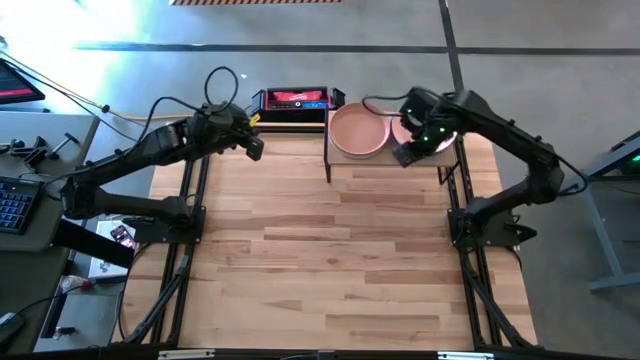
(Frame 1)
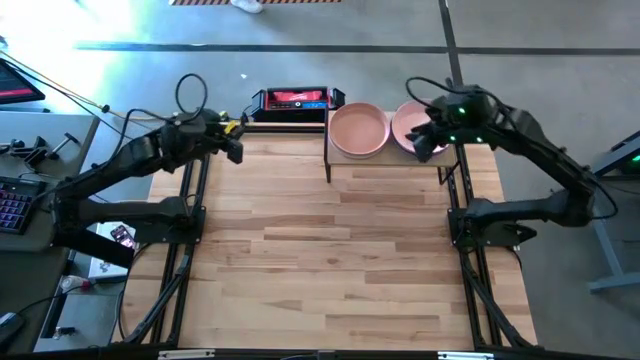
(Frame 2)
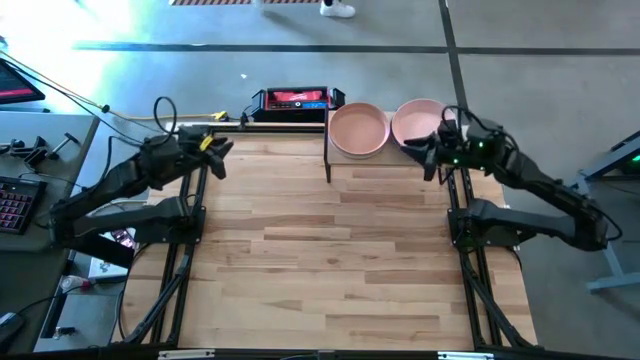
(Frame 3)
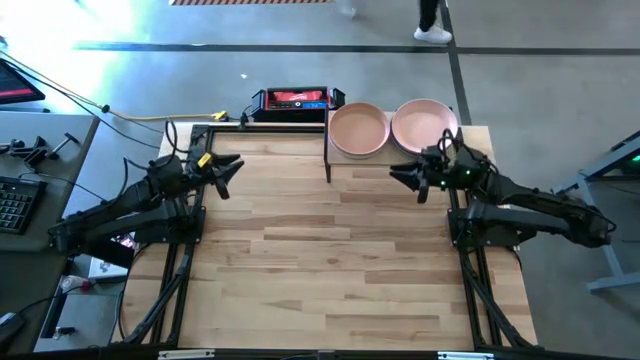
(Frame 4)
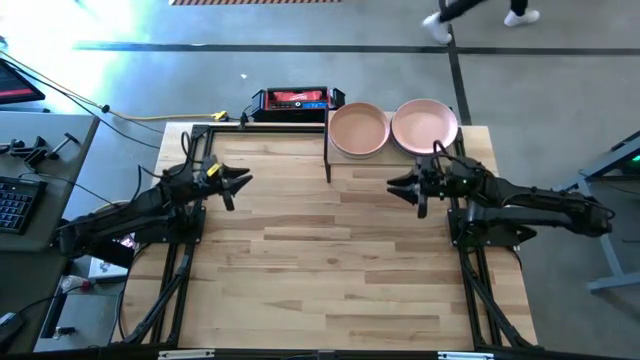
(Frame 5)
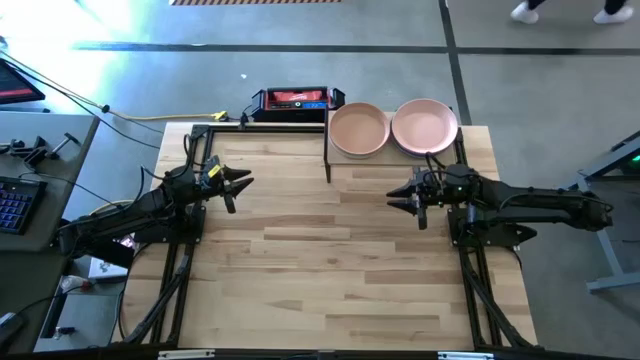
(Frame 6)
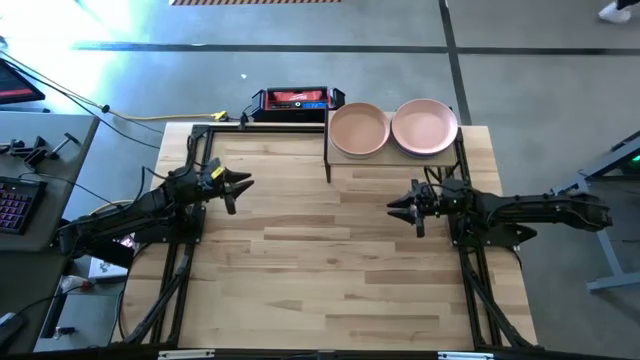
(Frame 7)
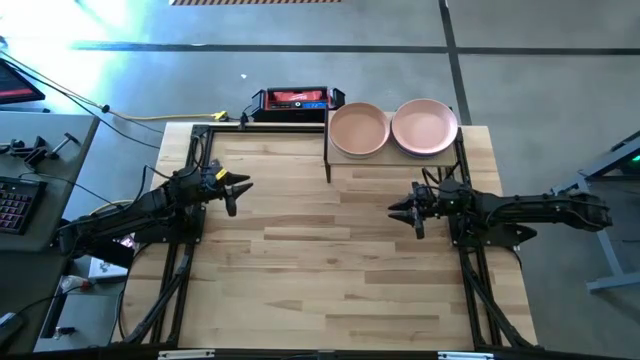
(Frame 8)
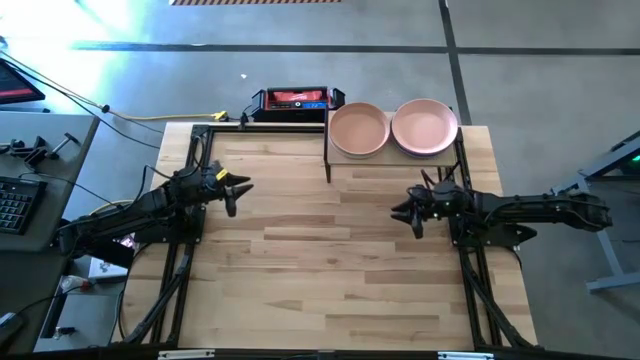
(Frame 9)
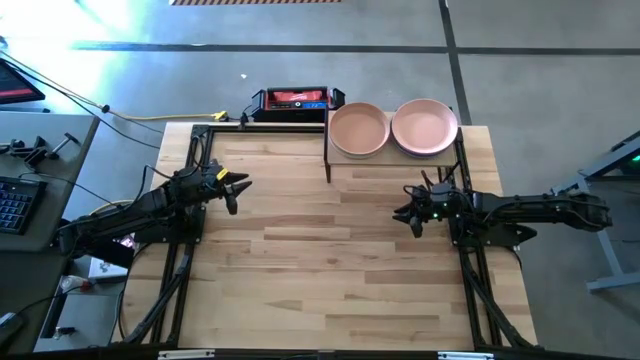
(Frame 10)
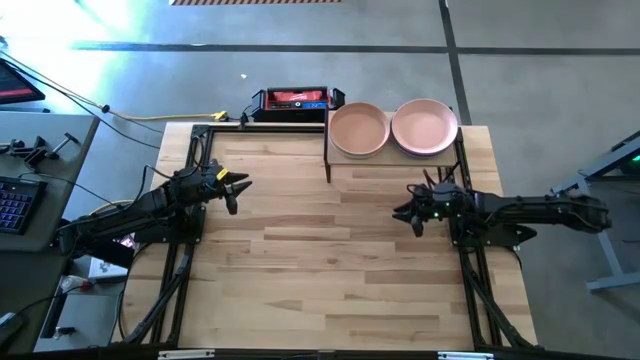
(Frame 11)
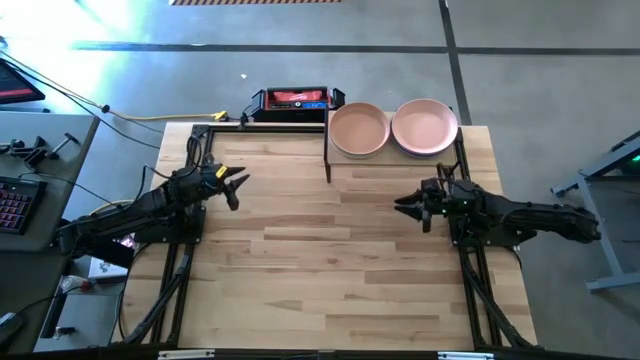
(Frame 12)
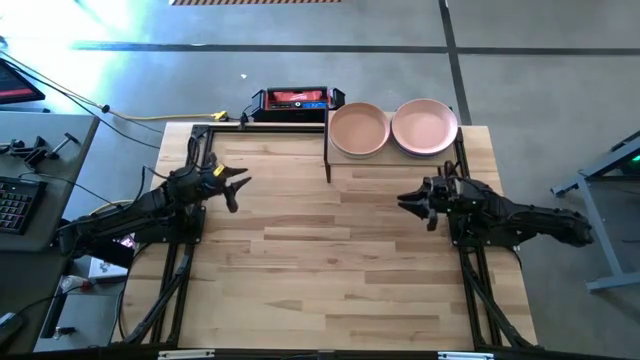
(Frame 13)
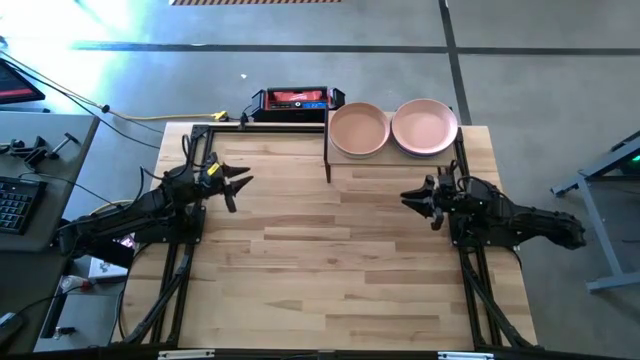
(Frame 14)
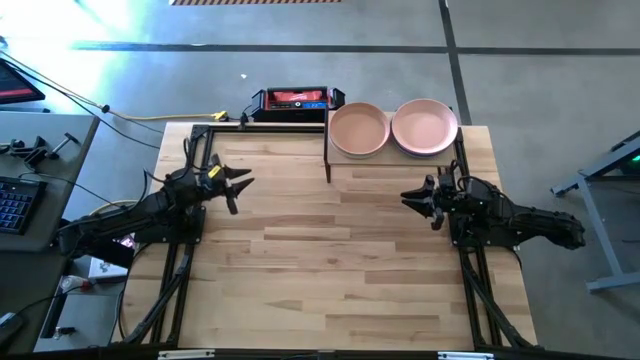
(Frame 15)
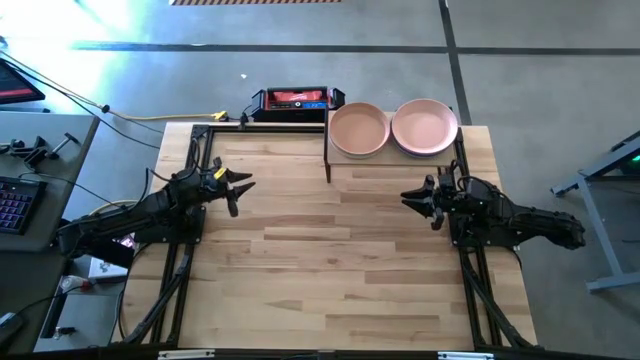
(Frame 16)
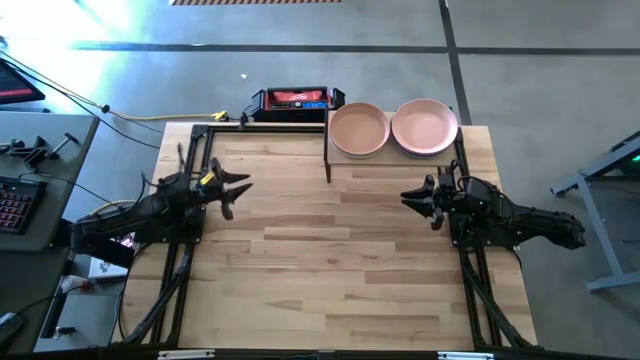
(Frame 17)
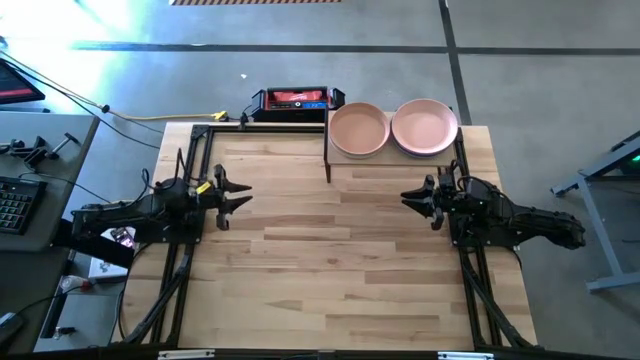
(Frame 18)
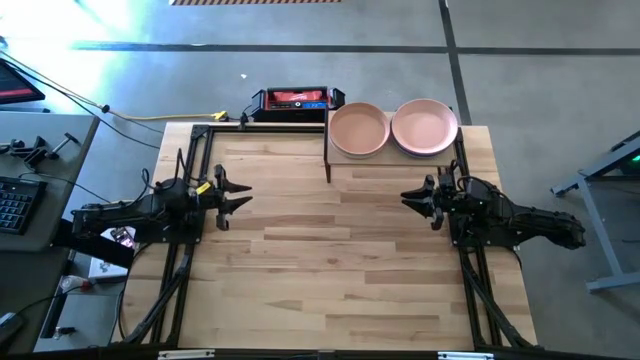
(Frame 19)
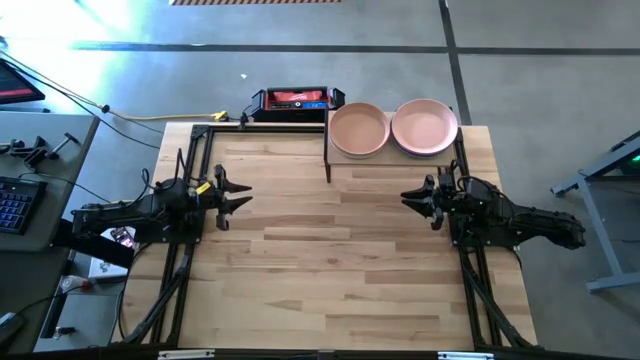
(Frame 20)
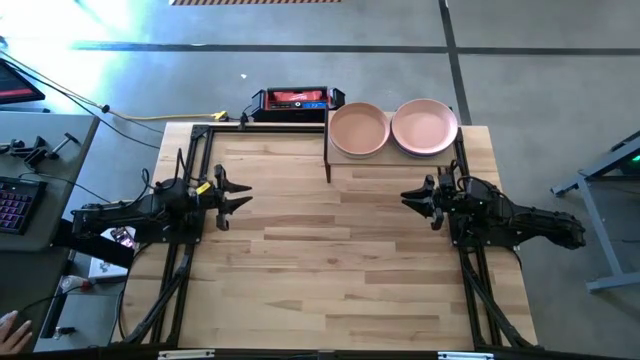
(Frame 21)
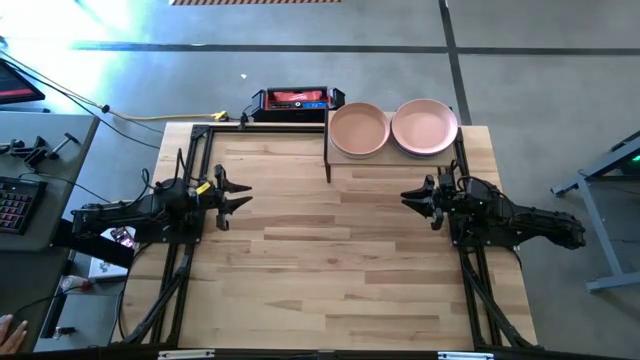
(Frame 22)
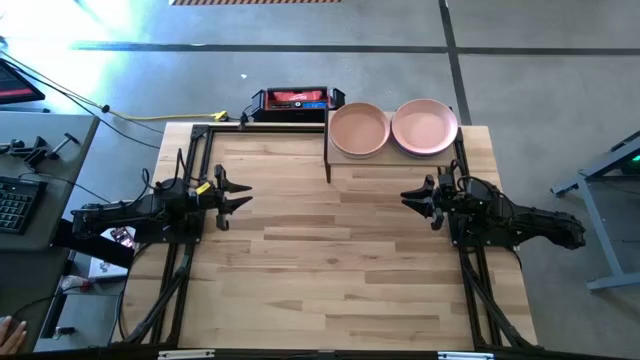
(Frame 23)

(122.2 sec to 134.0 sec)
Task: Place and stack plates onto a shelf
Return to Home Position

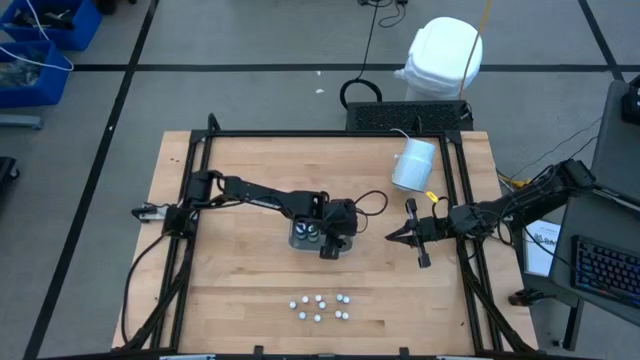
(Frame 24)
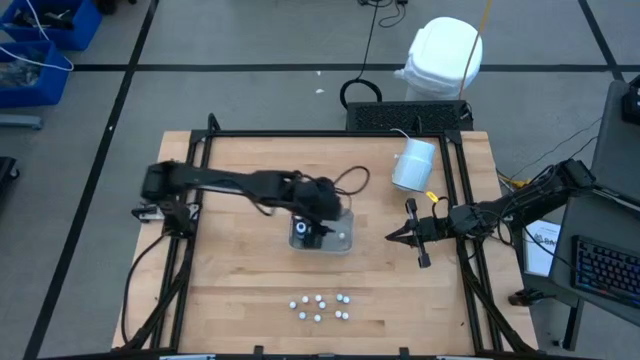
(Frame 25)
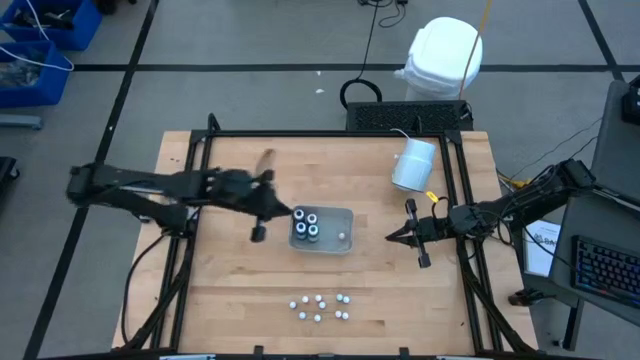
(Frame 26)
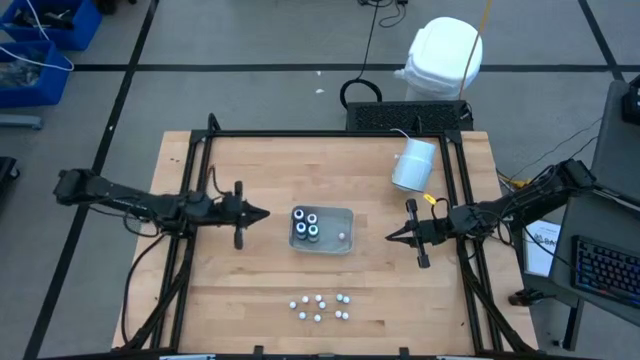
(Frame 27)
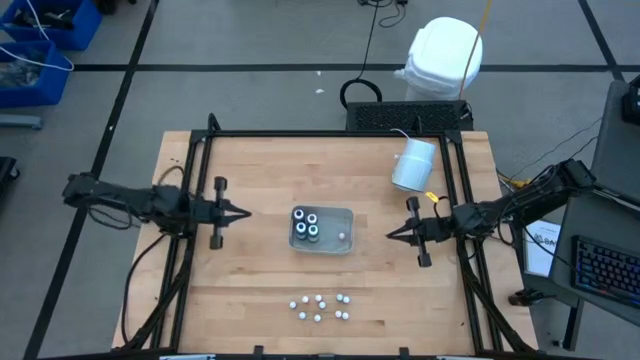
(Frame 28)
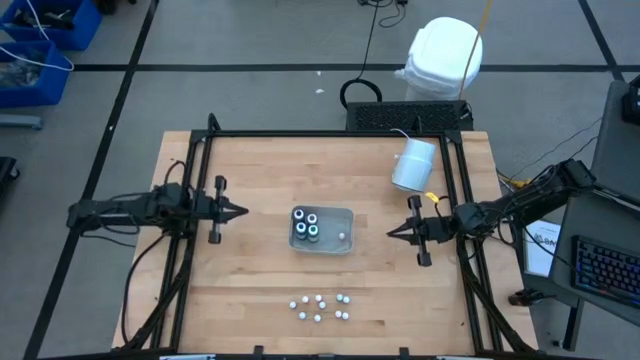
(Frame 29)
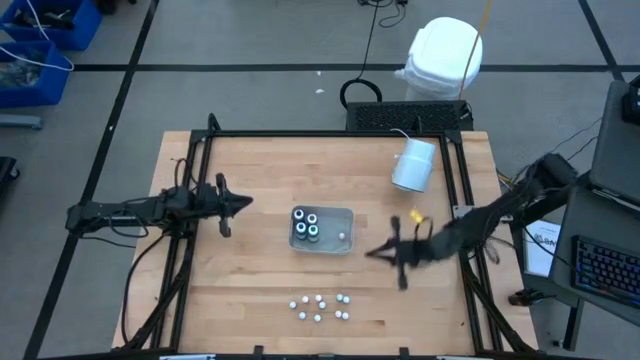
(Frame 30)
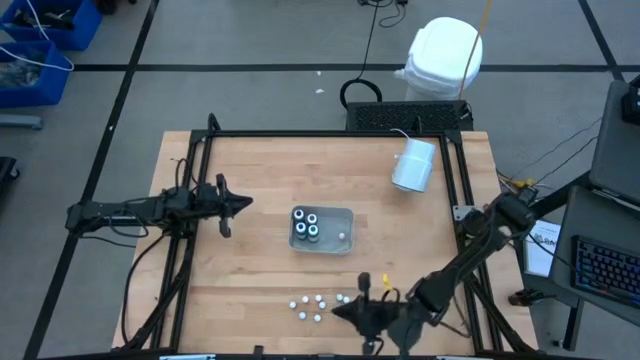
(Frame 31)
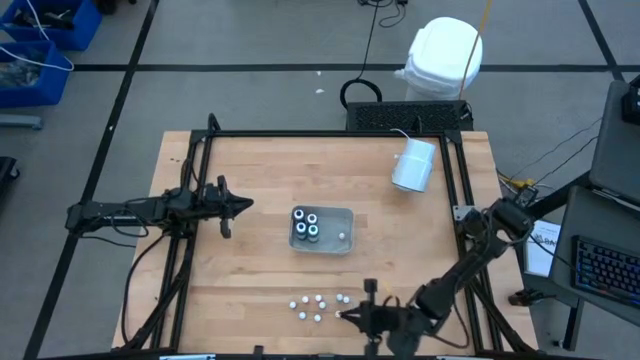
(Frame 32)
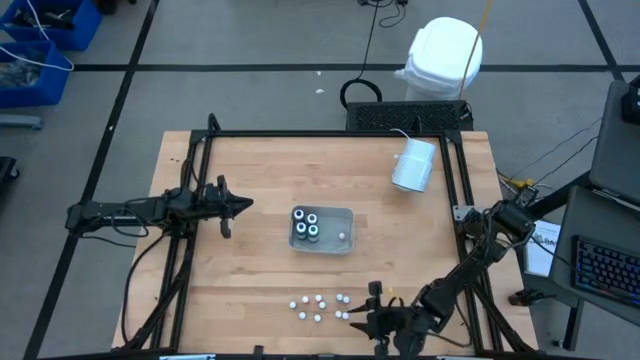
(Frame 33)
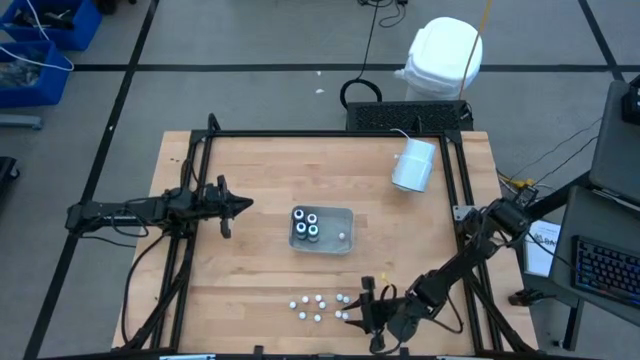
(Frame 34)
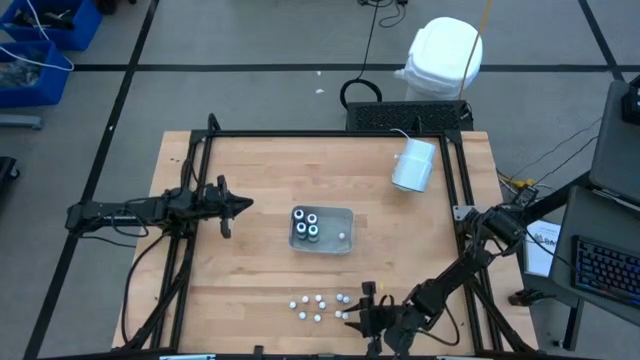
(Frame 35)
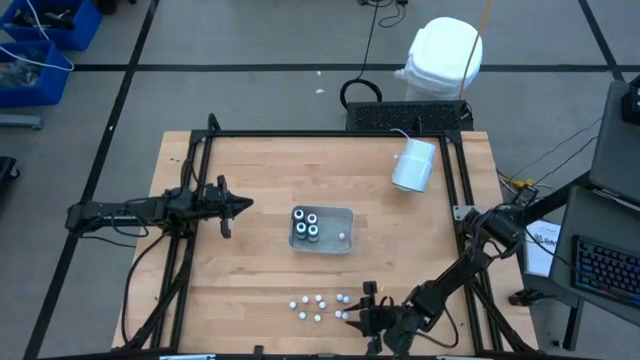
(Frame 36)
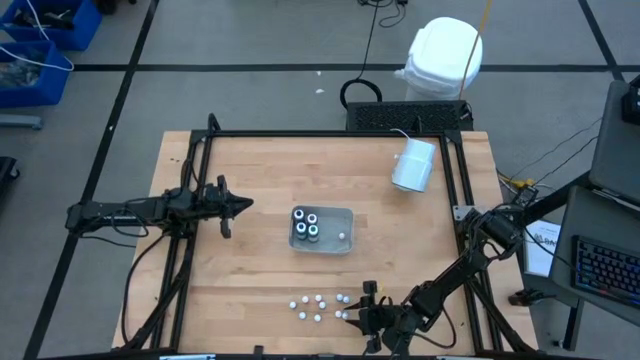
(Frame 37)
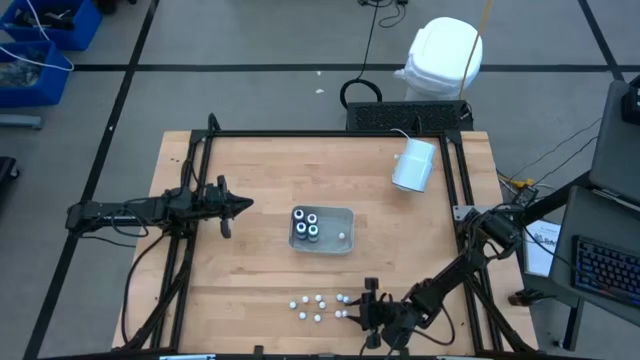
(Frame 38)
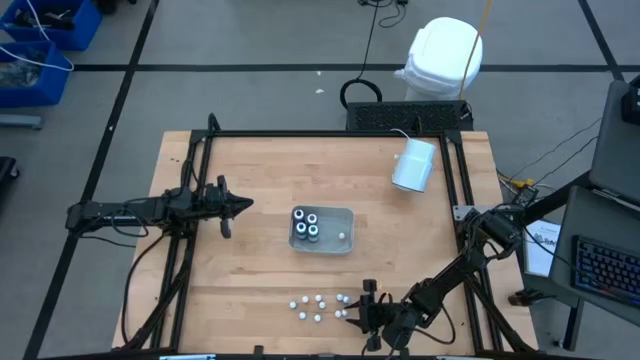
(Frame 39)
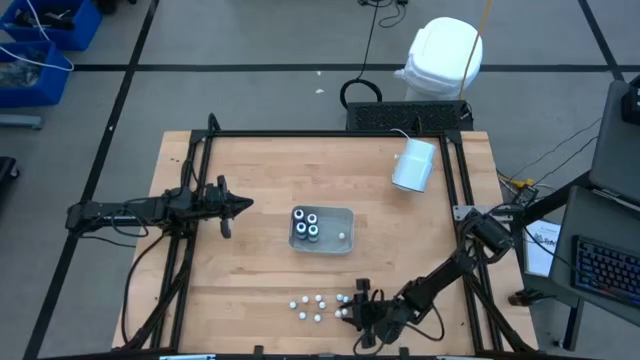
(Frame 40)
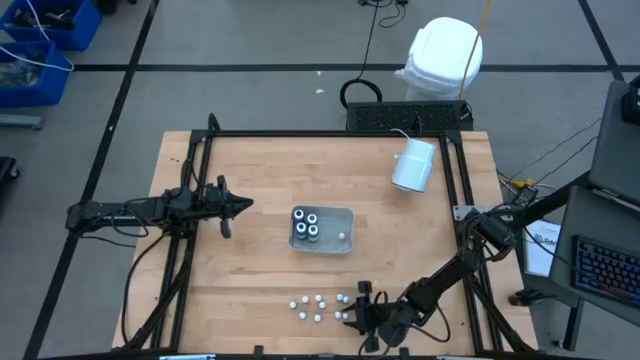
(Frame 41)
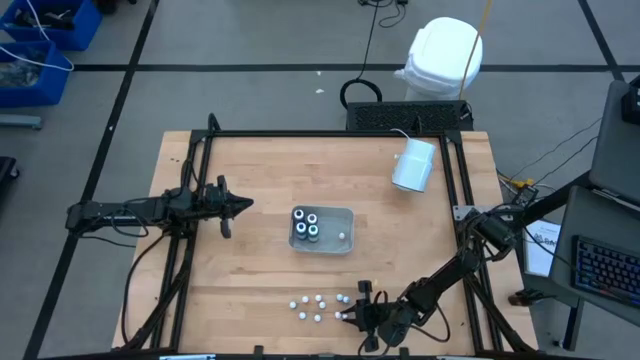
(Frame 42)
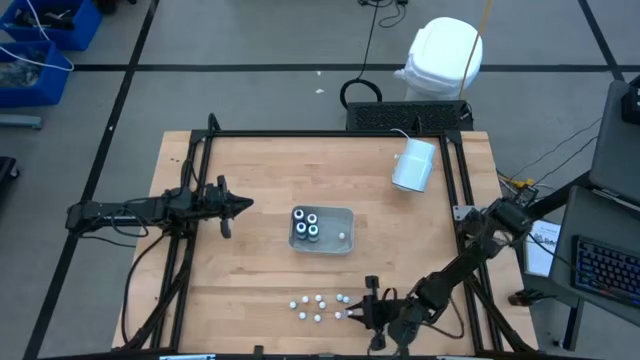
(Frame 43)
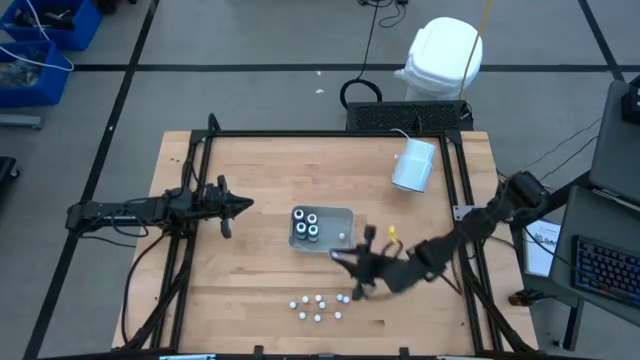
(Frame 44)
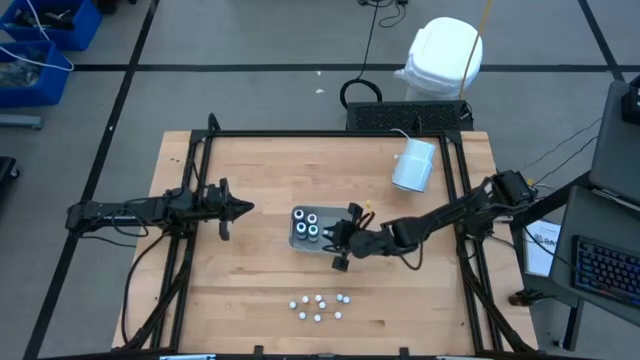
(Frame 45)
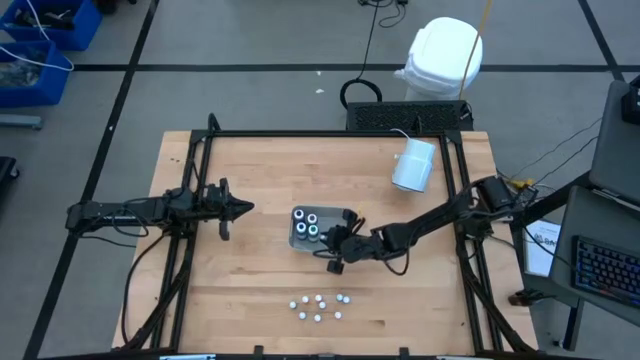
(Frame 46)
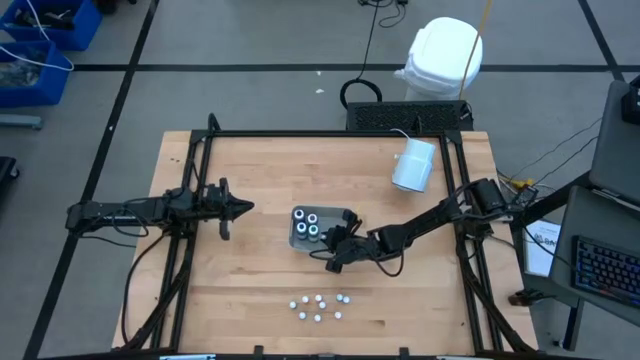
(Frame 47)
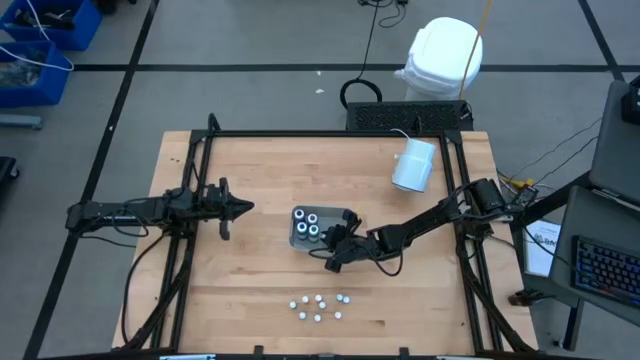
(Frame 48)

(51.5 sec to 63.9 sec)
Task: Pick & Place food coloring
Put the small red bottle into the gray bin
